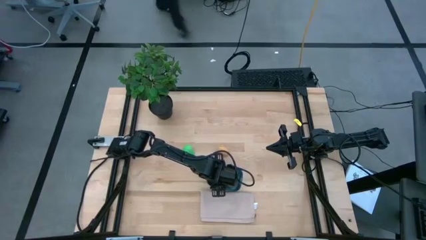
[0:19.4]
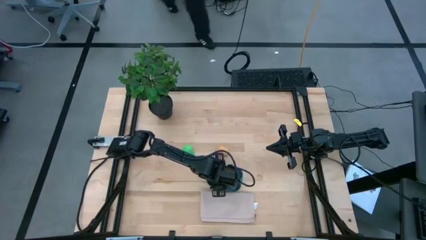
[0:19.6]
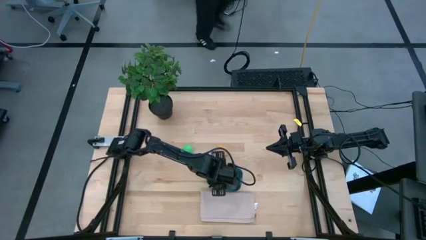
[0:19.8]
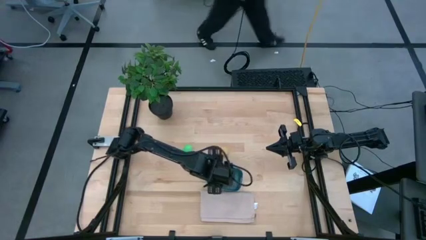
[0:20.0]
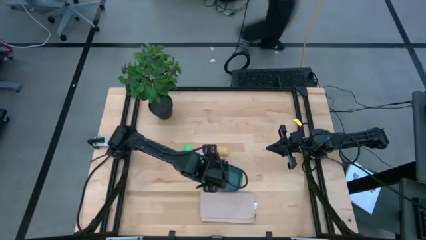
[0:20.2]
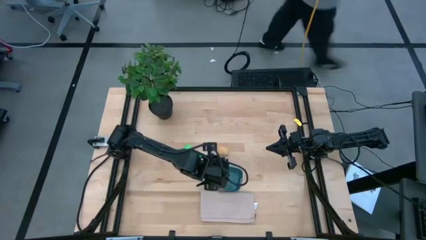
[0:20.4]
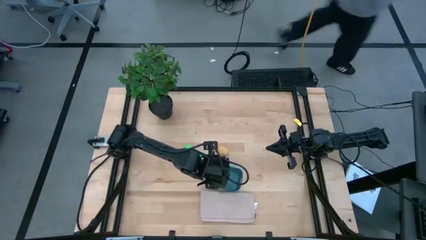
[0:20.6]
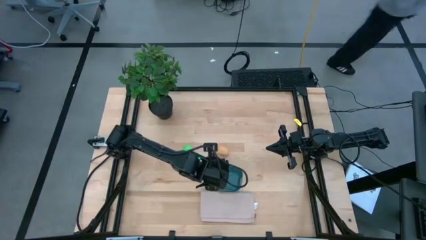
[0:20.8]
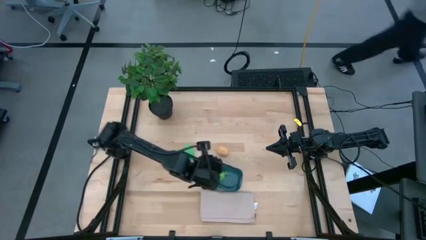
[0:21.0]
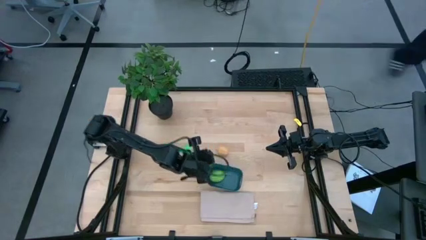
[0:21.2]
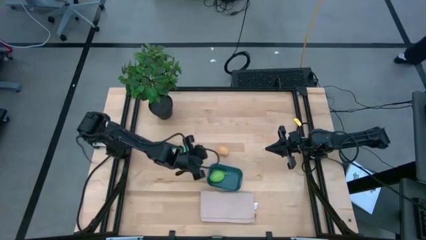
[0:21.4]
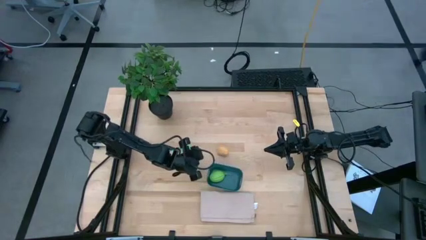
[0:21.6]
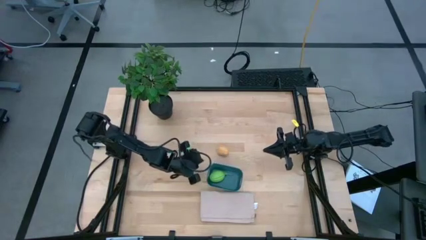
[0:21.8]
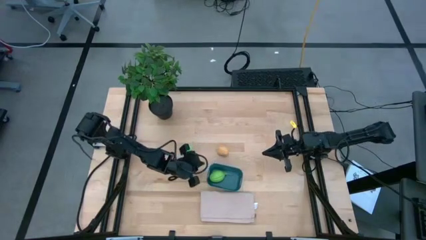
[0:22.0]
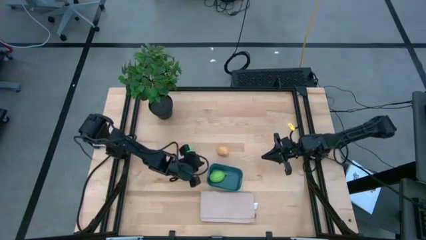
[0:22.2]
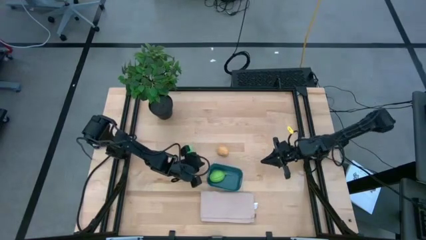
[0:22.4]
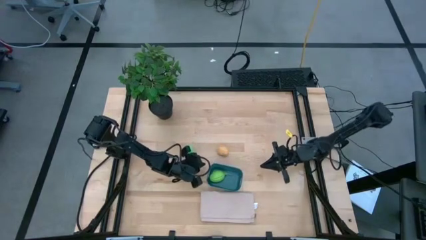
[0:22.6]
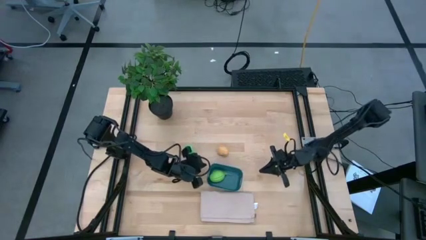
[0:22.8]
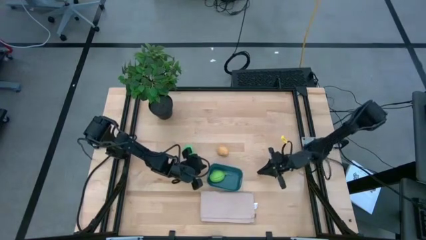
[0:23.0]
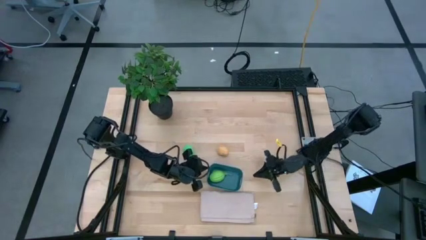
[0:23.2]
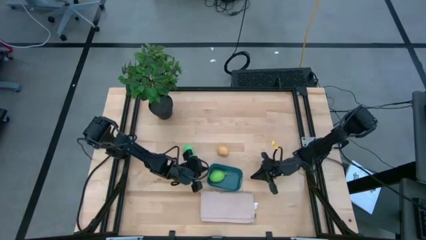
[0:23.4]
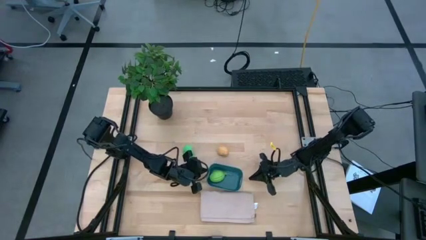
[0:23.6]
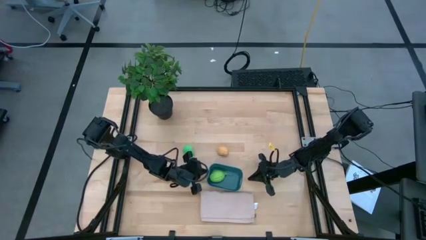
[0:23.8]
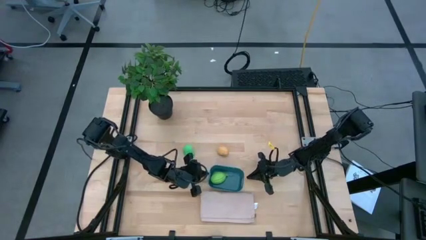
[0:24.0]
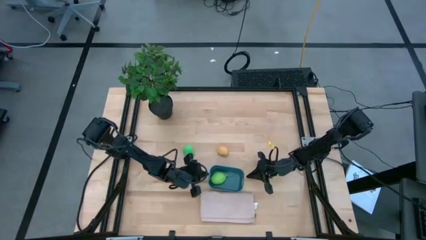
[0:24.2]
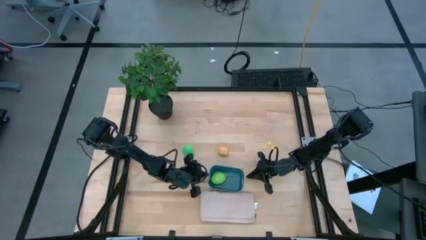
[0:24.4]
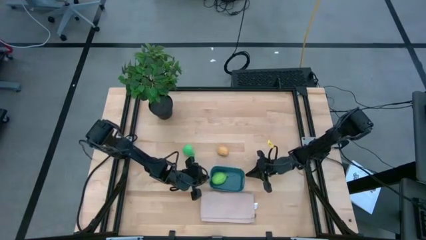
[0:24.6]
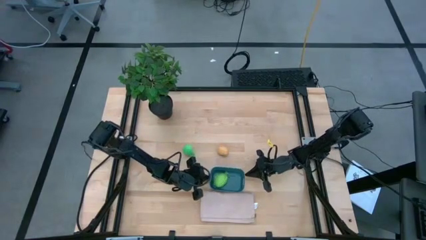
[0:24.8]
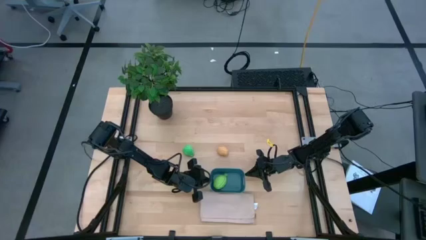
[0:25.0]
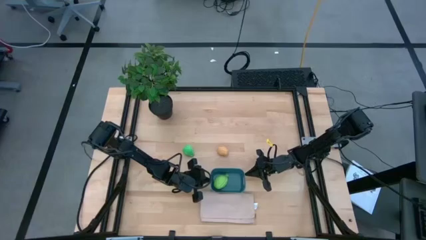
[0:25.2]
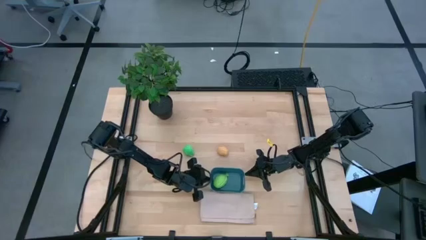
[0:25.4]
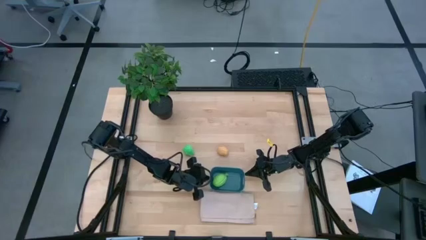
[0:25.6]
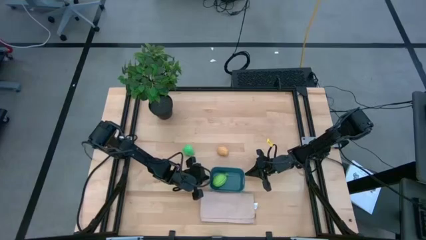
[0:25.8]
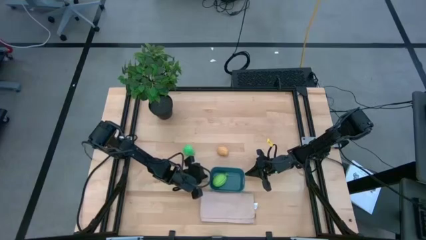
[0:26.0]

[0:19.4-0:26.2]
Task: Pick and placing Produce into tupperware
Adjust the blue bin

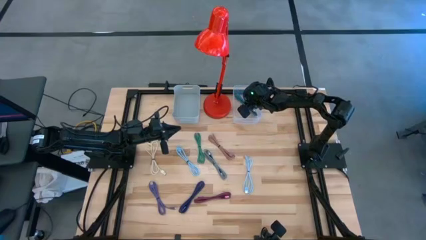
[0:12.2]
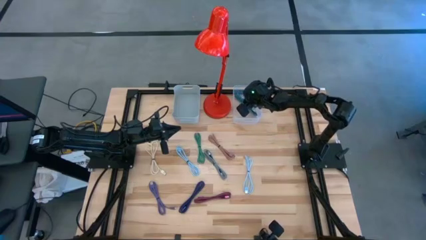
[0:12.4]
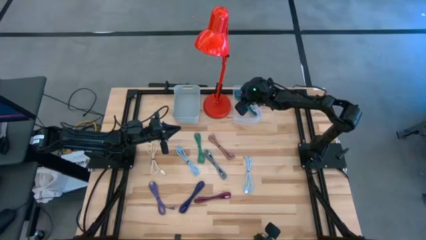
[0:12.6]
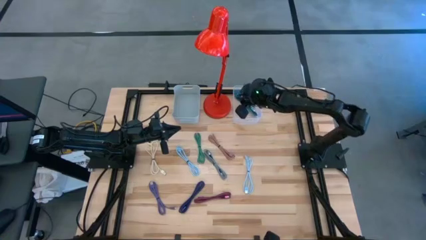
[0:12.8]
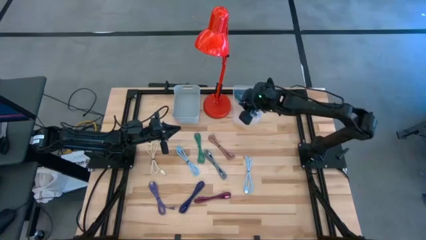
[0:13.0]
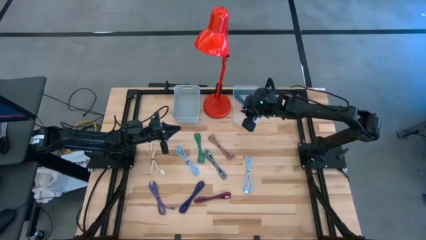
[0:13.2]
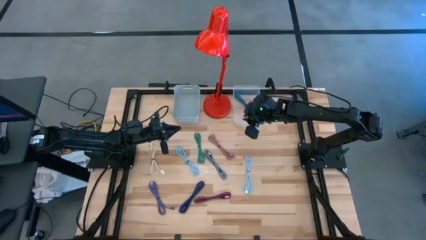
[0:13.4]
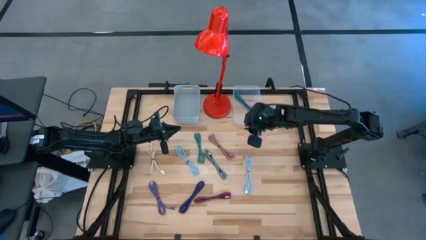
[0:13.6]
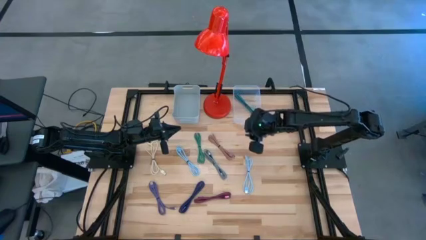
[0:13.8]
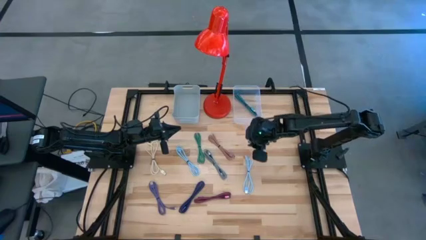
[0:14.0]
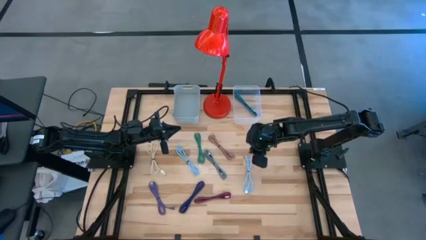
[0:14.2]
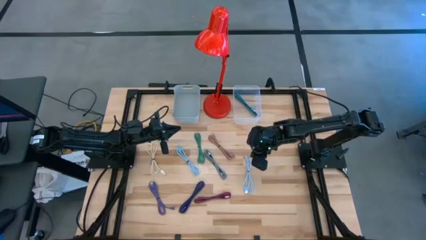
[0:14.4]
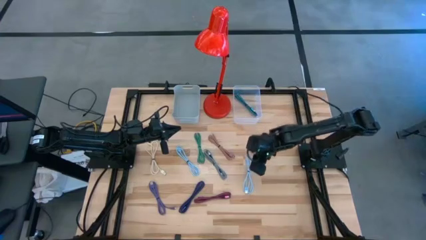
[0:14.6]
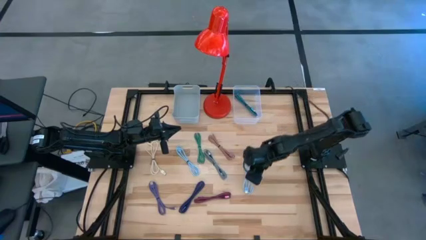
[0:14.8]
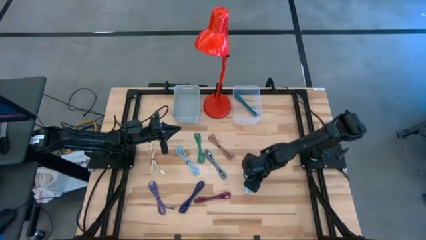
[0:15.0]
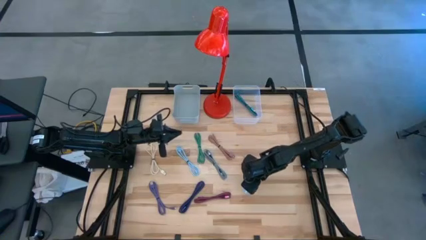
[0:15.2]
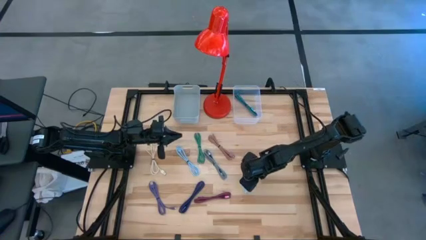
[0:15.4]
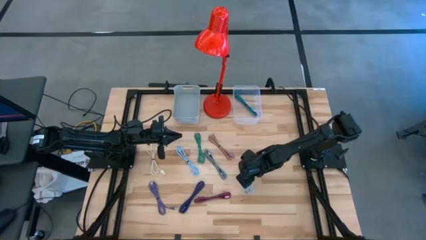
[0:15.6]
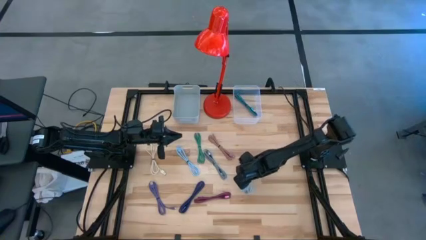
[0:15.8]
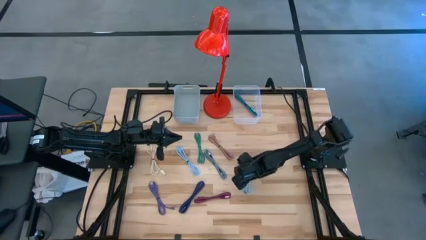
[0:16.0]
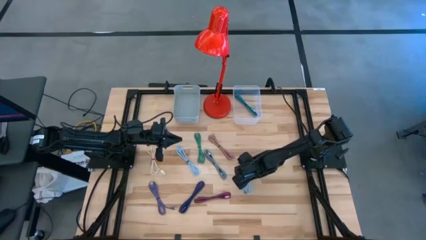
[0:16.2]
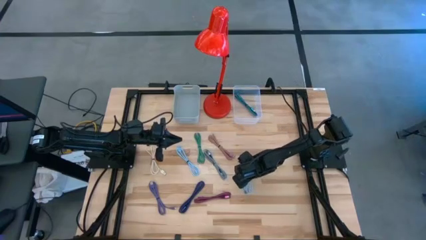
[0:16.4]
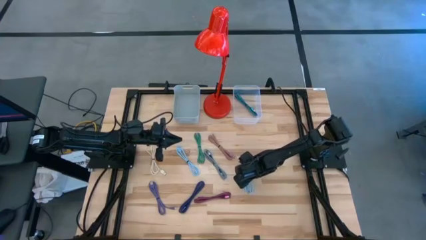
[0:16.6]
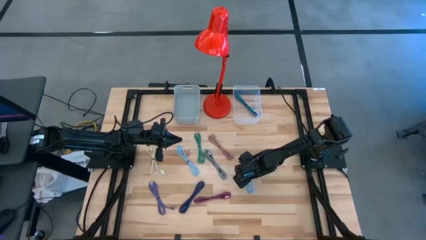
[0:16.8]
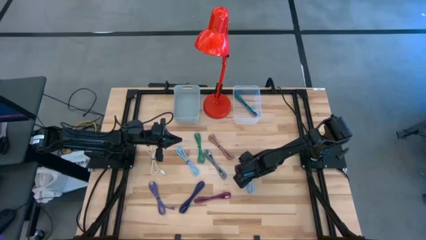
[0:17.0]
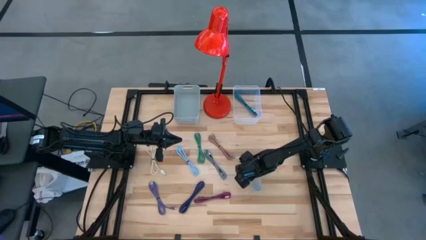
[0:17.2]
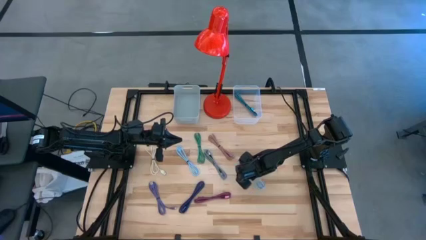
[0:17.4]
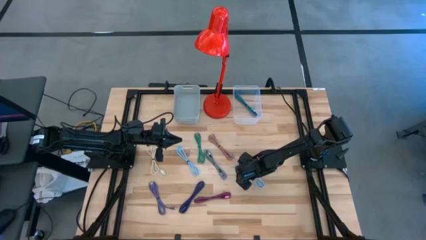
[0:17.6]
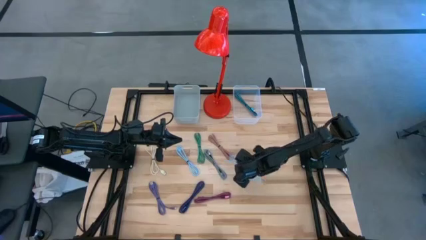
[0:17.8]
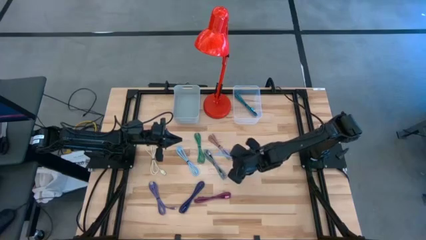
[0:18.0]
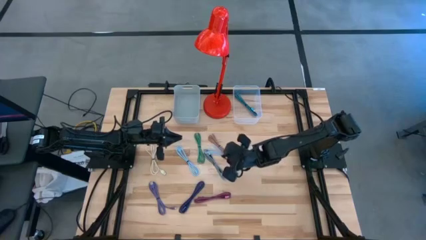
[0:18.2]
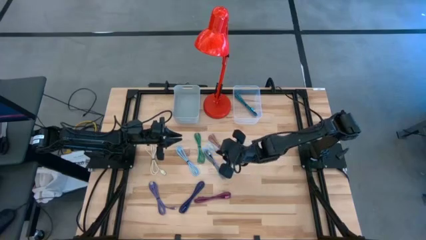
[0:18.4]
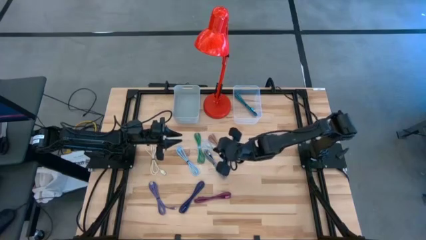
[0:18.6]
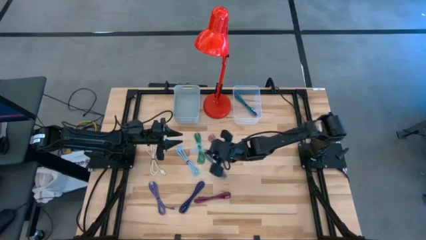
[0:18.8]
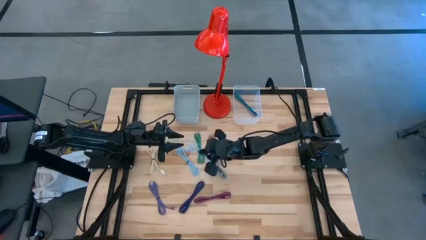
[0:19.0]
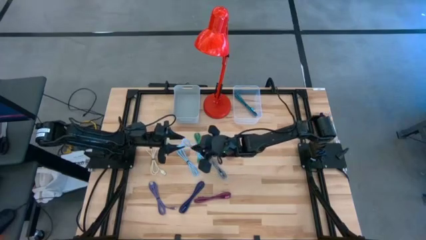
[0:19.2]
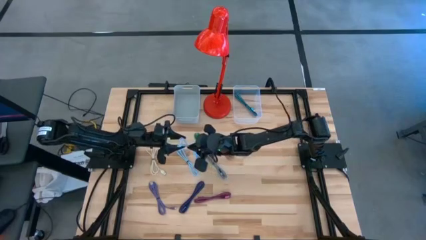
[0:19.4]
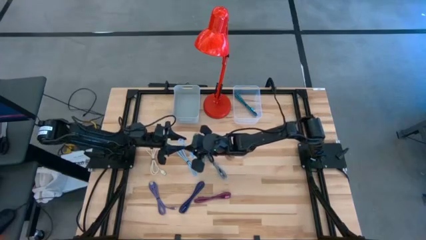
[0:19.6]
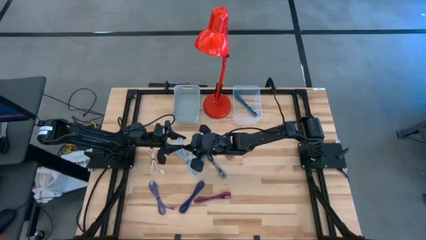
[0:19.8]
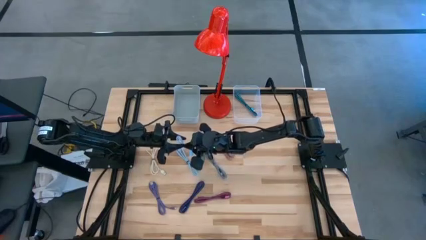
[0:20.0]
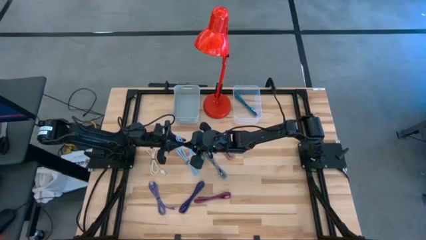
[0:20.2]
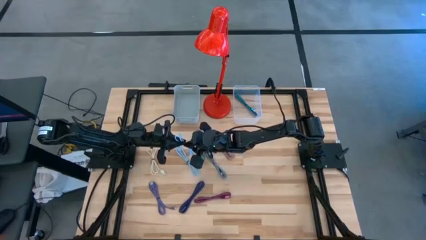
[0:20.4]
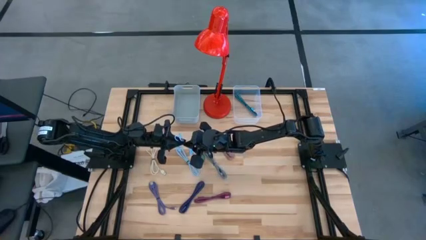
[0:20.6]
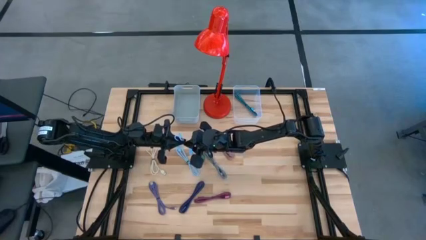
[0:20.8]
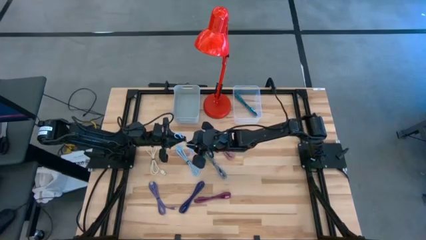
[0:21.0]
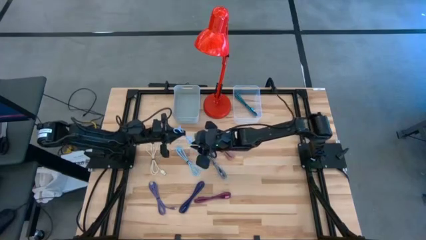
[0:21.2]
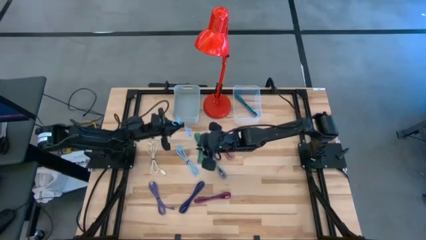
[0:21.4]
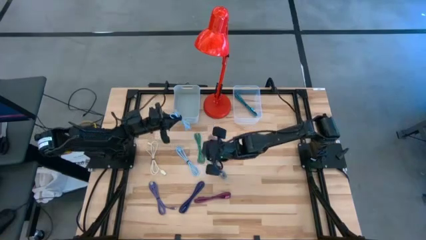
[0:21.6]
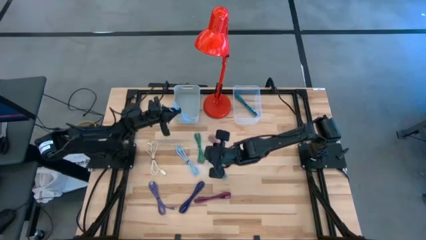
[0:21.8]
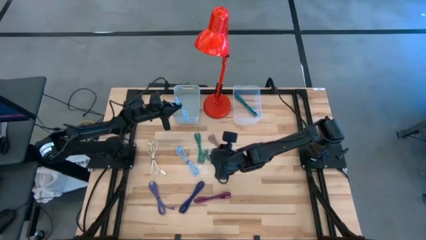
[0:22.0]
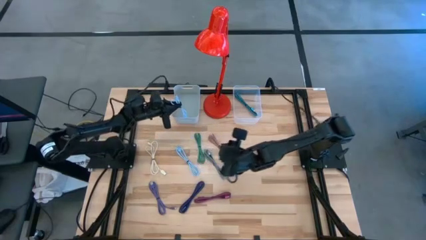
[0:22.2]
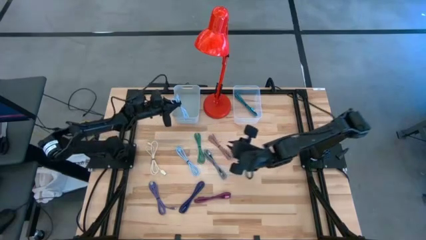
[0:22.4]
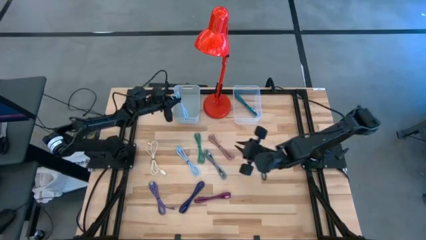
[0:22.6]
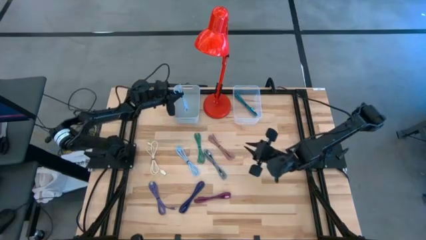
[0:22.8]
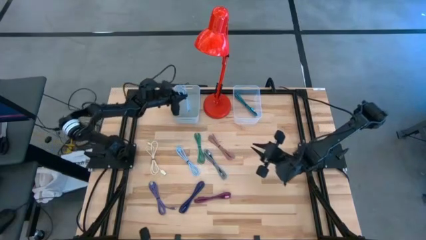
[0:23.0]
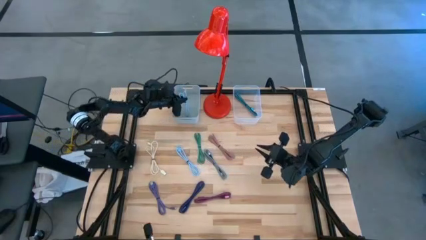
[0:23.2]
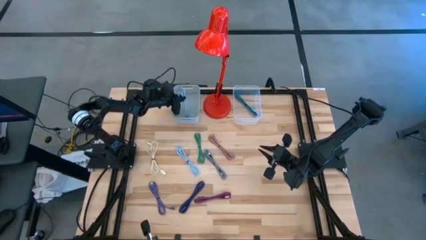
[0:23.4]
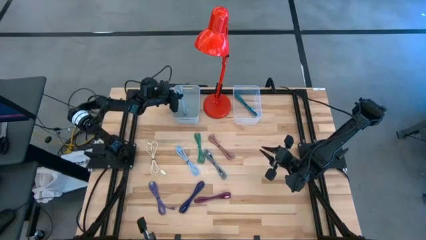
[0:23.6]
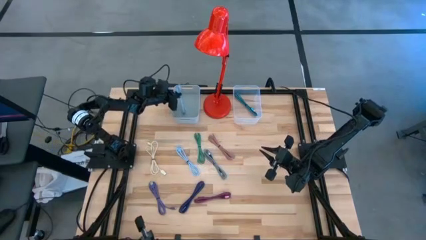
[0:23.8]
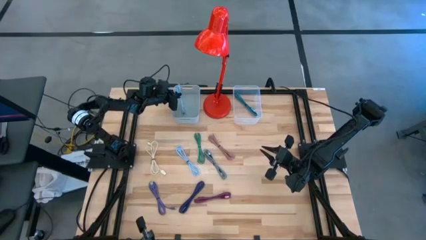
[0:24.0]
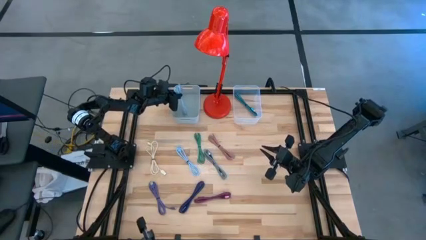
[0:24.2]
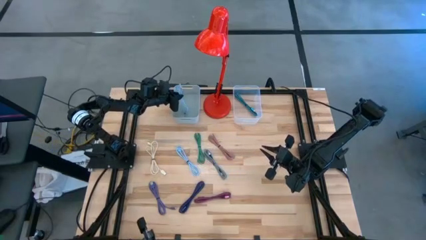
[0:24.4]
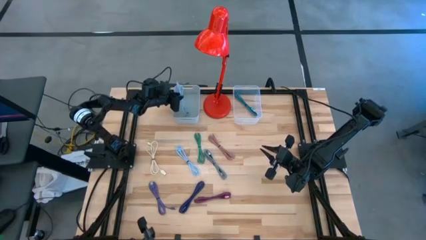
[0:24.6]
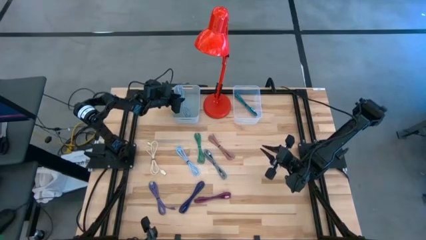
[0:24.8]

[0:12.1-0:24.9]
Task: Pick & Place USB Port
Put the right light blue charger cable into the gray bin
